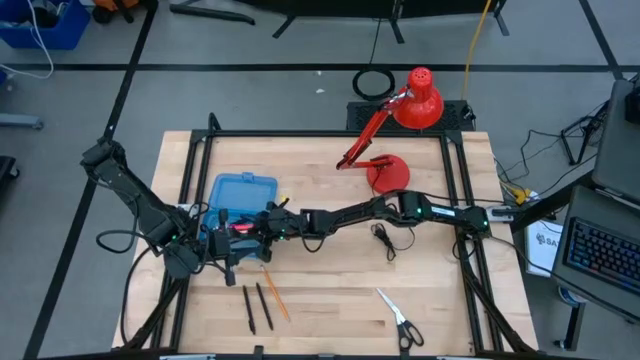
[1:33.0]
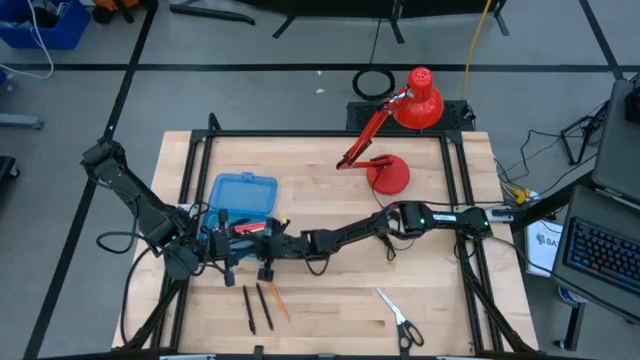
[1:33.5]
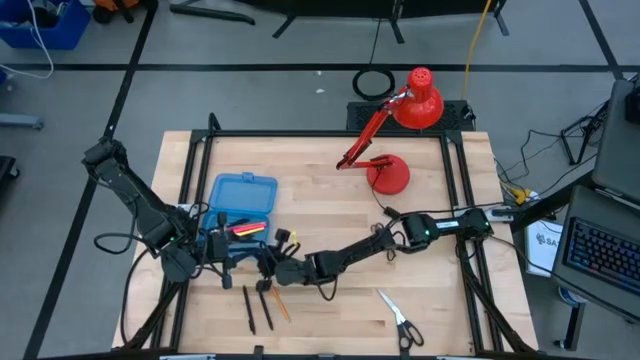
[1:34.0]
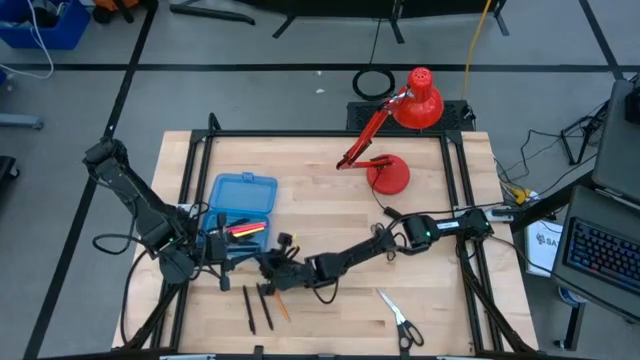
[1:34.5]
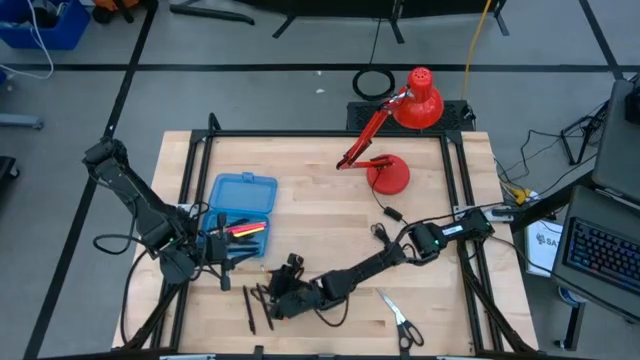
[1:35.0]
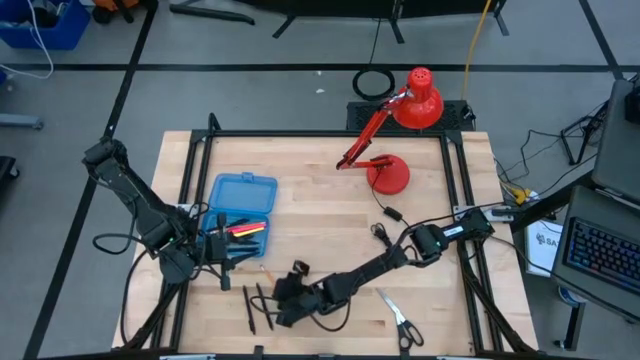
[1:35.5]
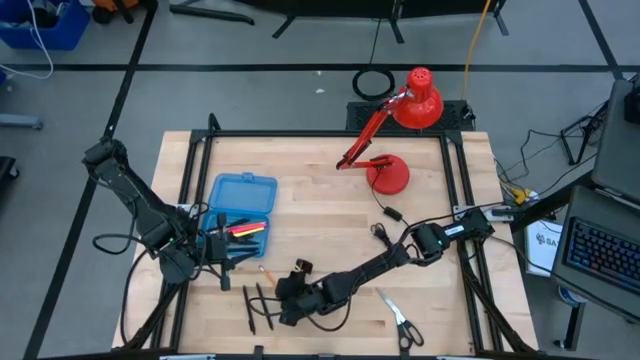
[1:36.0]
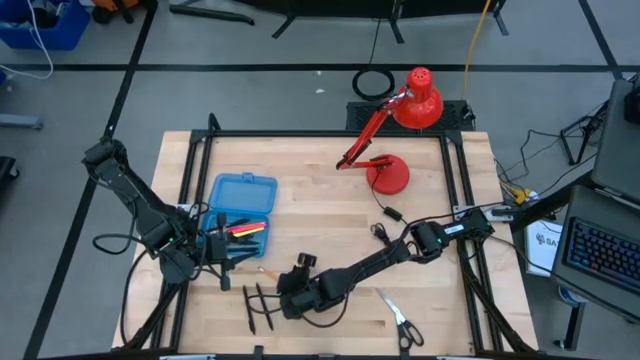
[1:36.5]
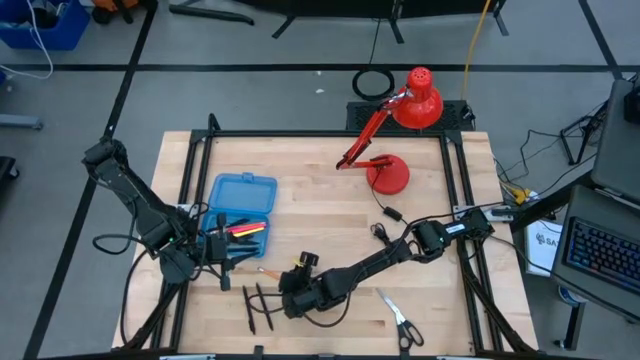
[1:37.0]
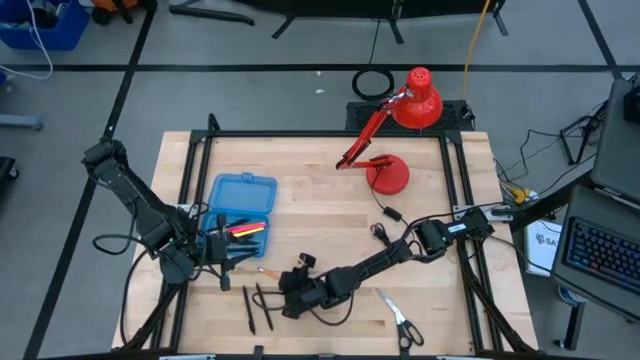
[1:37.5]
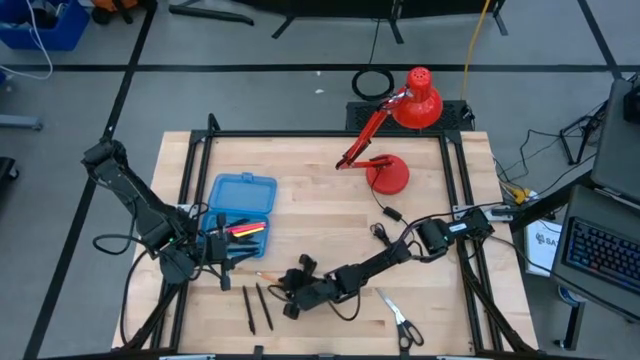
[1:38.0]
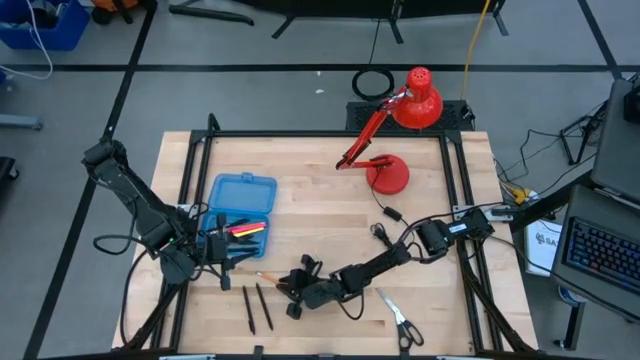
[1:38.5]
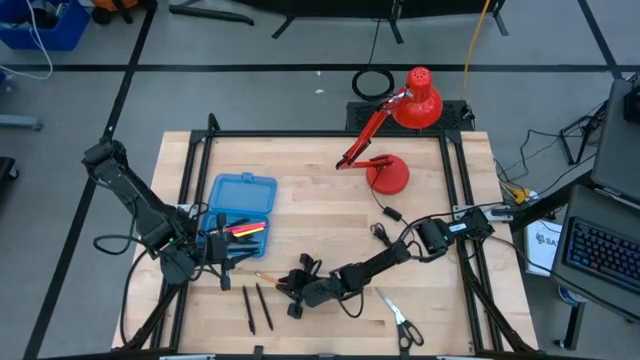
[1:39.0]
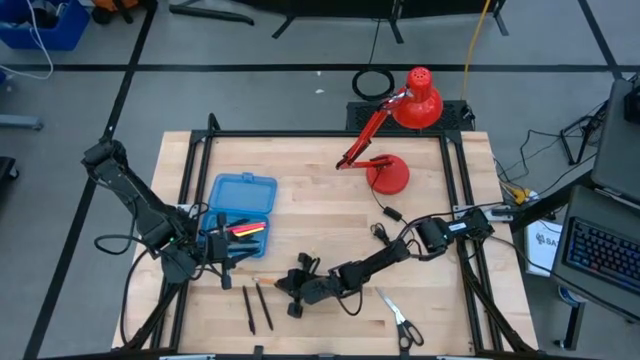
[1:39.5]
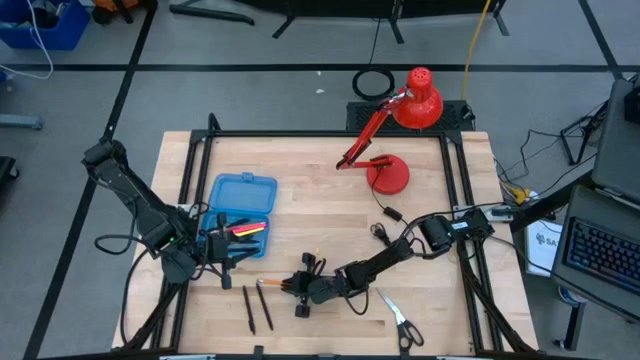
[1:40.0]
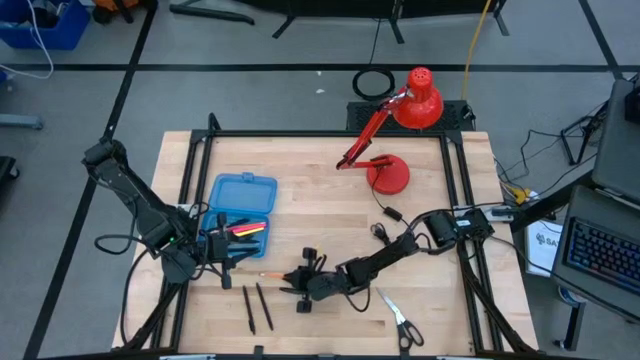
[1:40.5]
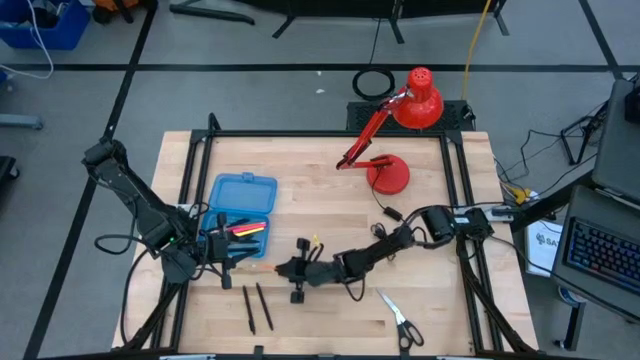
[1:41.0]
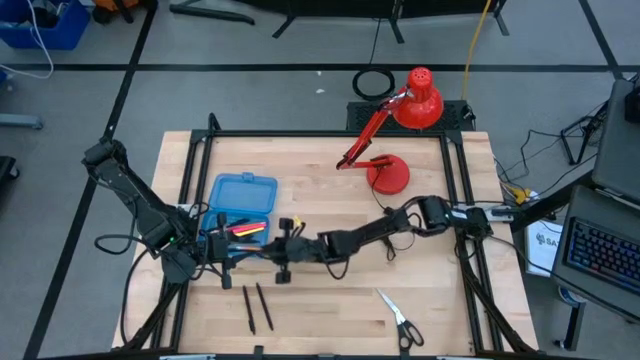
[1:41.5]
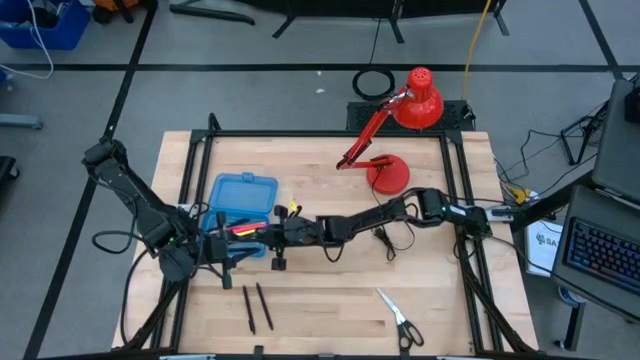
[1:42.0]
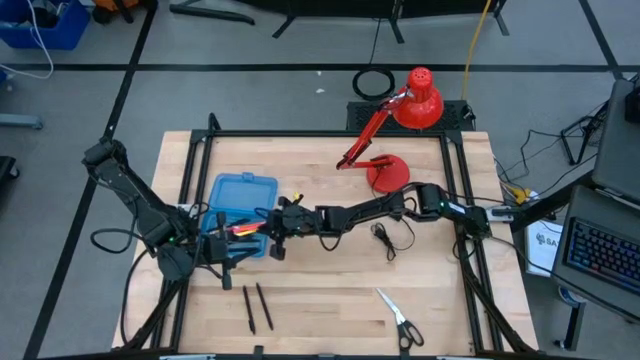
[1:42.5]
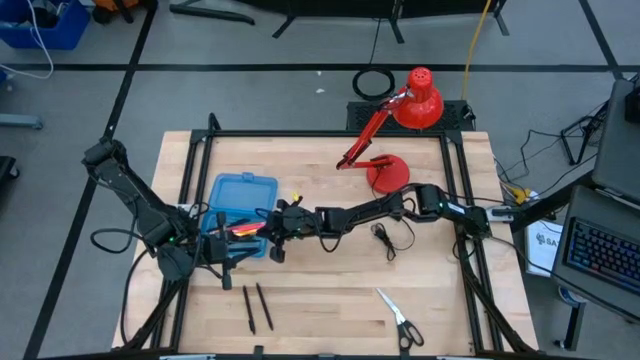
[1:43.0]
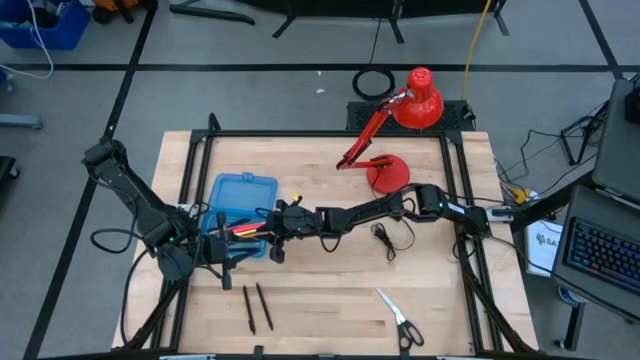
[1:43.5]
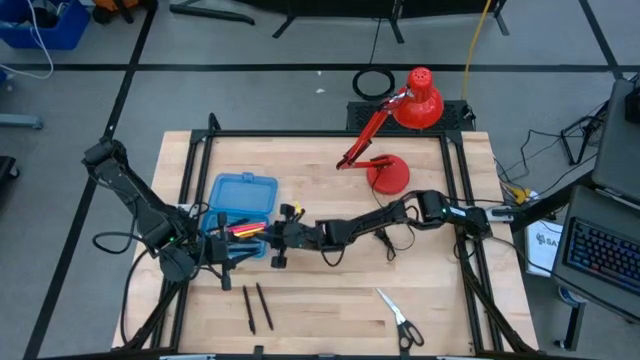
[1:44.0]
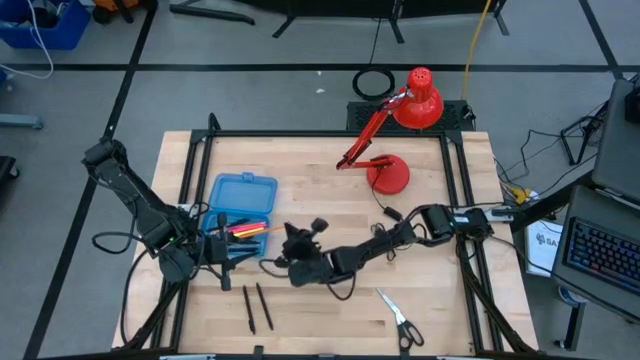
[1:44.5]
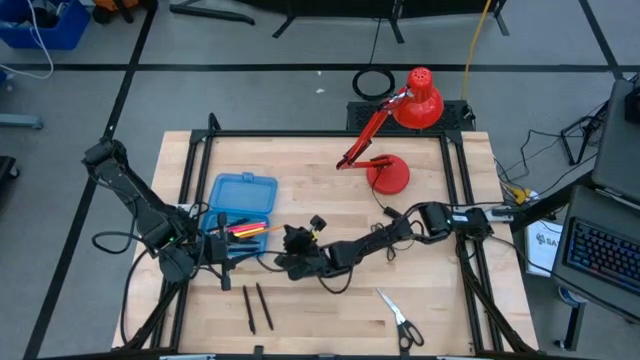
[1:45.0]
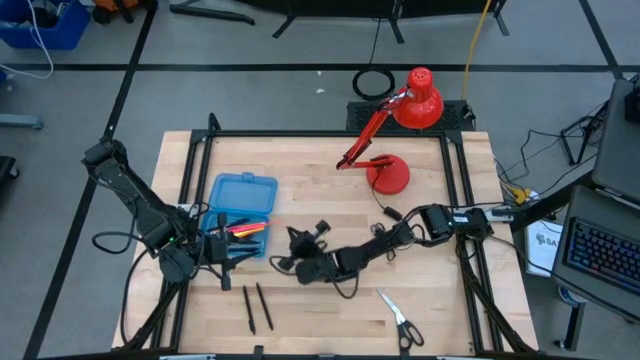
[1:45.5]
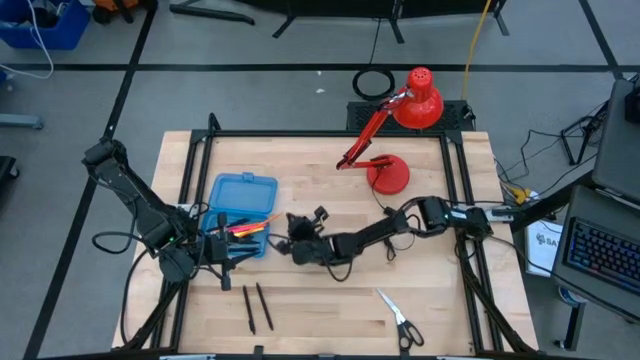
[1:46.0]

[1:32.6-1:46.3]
Task: Pick & place school supplies into a supply box
Put the yellow pencil into the blue supply box

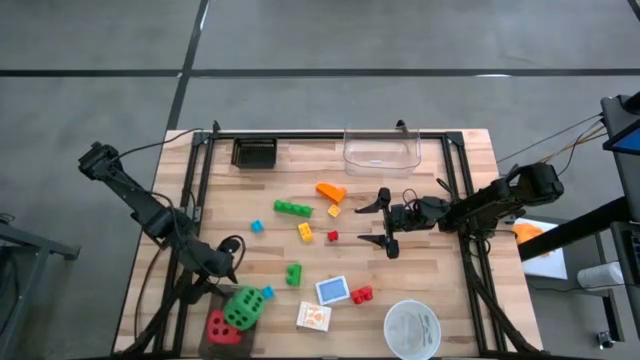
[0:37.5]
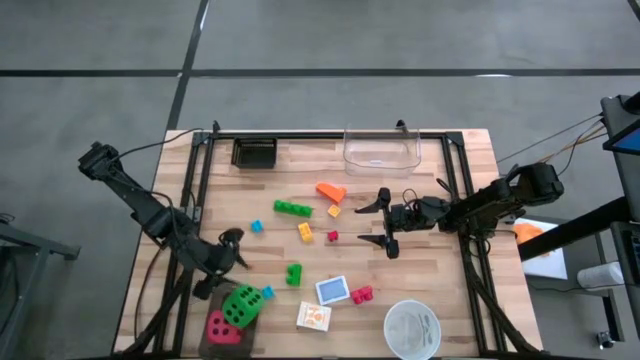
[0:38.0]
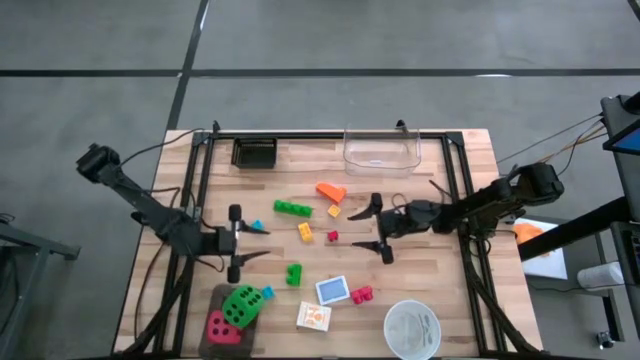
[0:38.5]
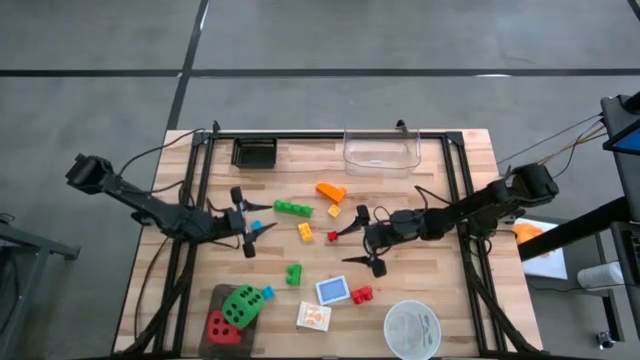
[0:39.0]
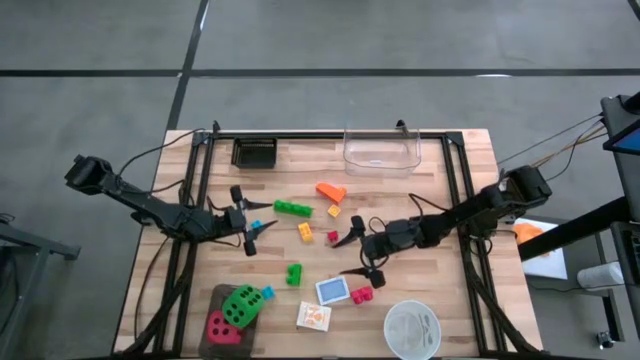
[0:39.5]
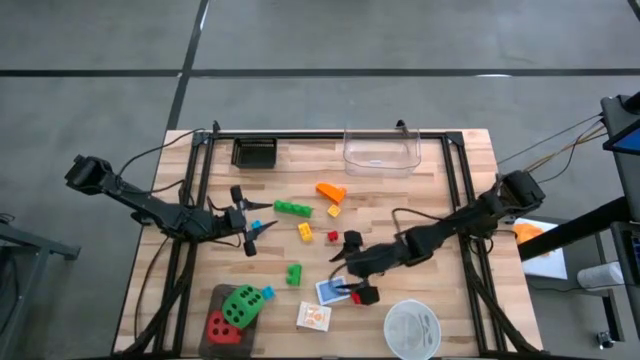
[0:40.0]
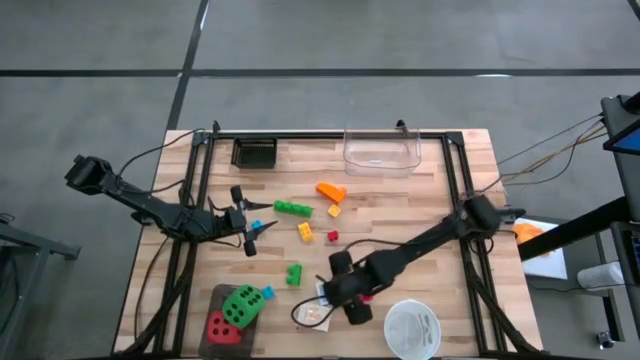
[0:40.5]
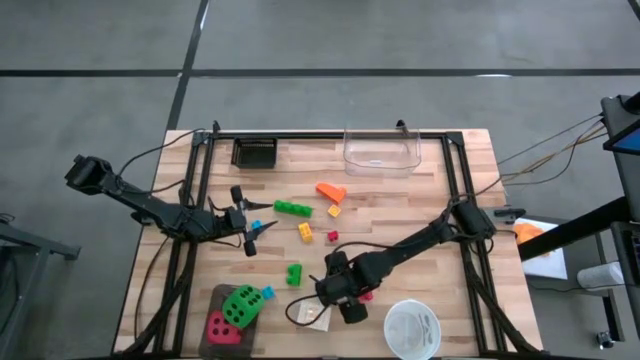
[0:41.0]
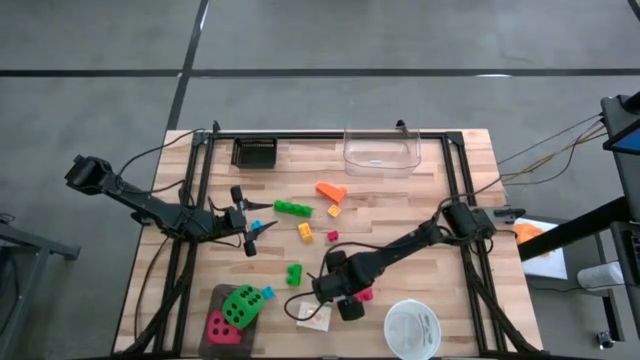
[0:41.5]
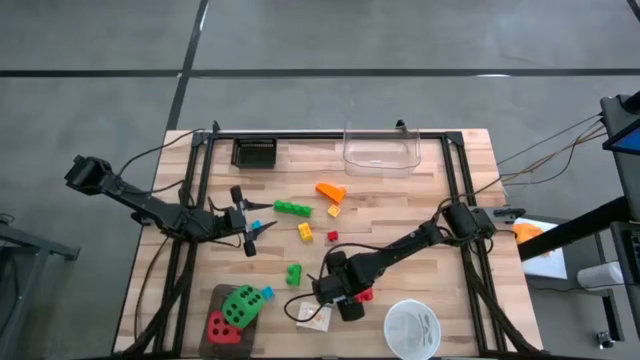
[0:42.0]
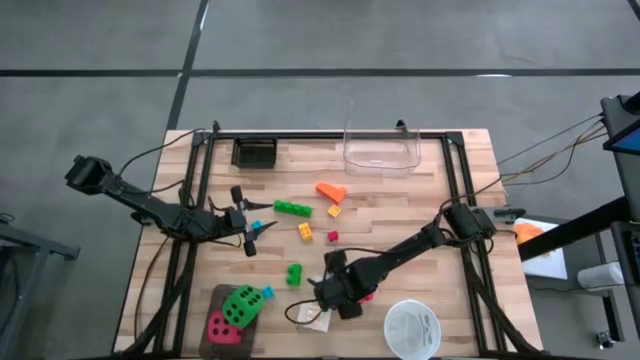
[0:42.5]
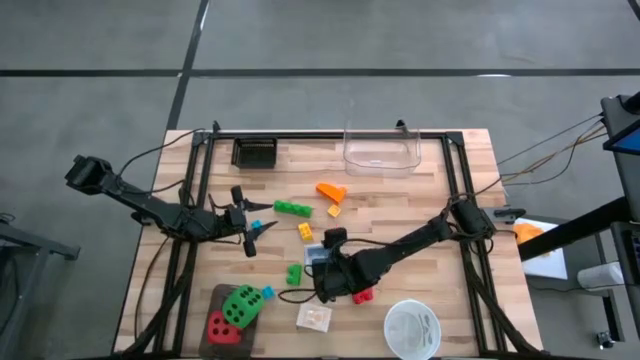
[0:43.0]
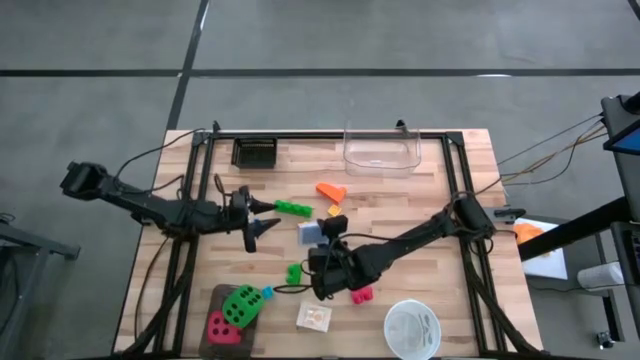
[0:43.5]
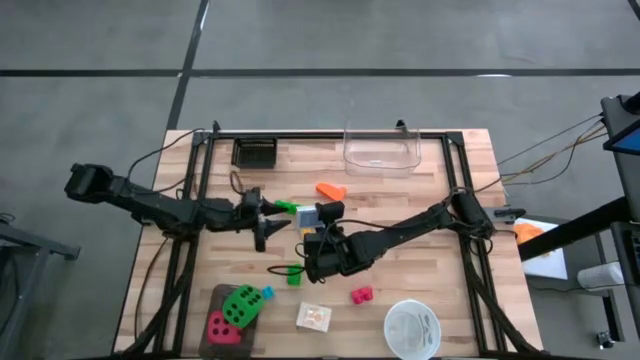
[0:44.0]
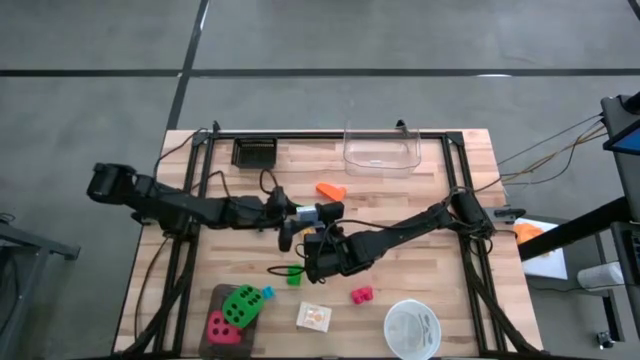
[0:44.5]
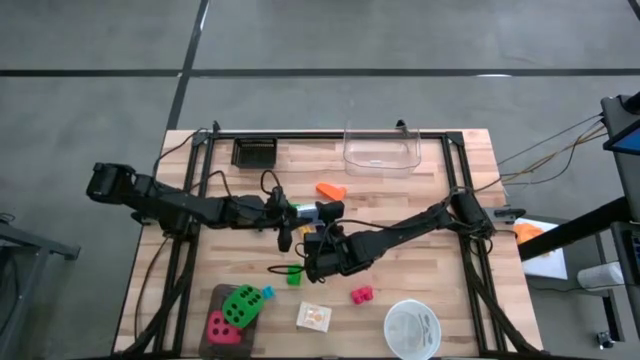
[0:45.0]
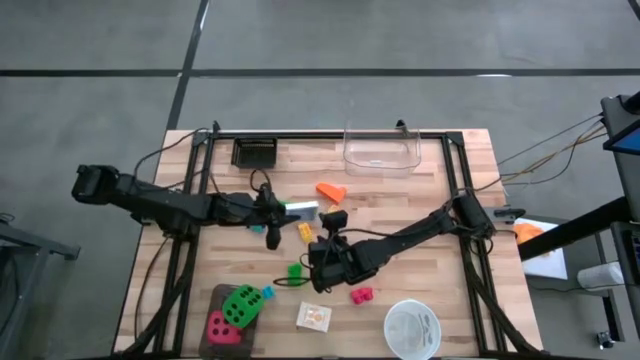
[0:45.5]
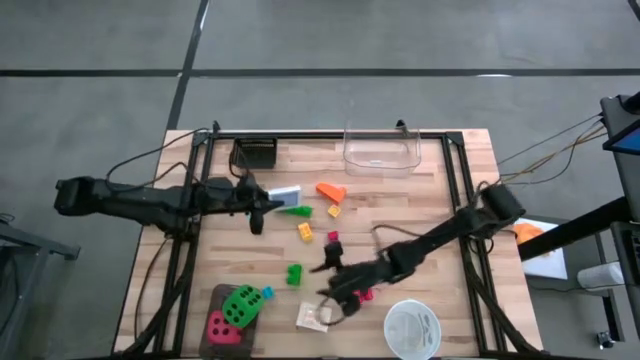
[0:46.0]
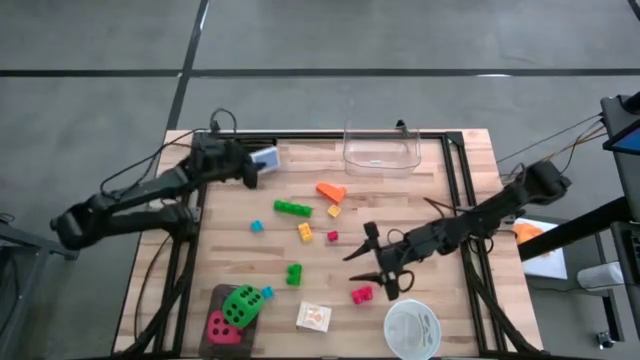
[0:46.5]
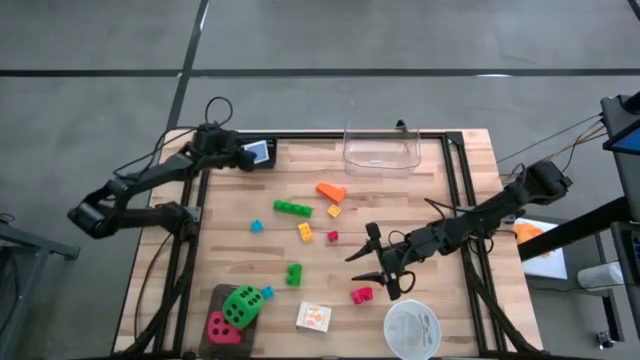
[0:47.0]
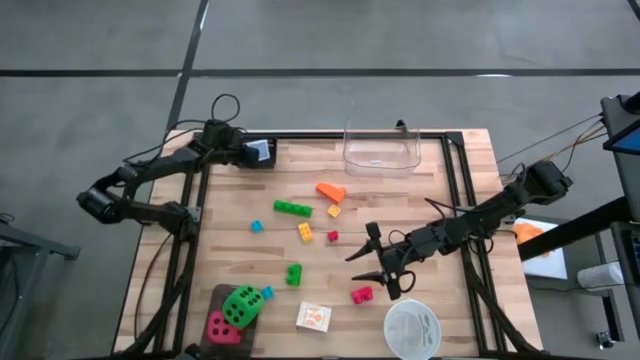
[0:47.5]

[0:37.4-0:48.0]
Task: Pick & Place Toys
Put the blue playing card box into the black bin
